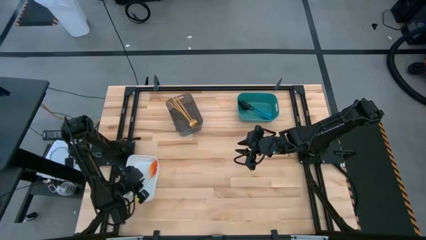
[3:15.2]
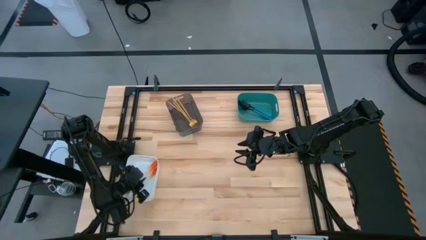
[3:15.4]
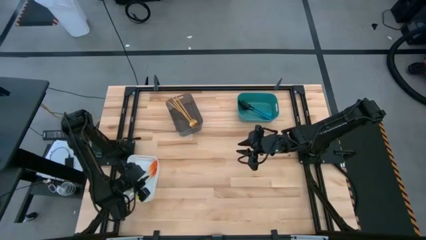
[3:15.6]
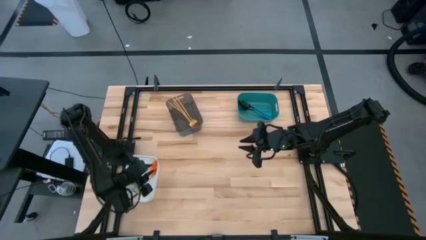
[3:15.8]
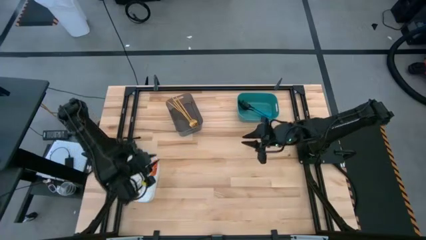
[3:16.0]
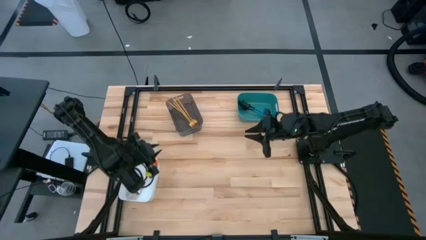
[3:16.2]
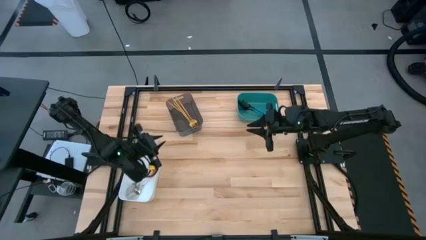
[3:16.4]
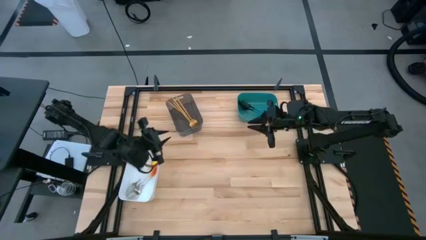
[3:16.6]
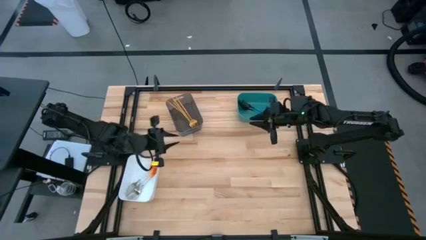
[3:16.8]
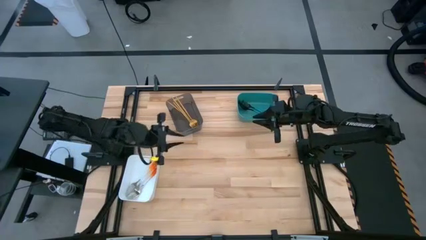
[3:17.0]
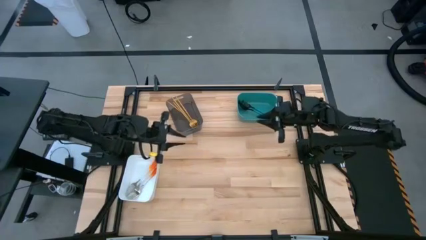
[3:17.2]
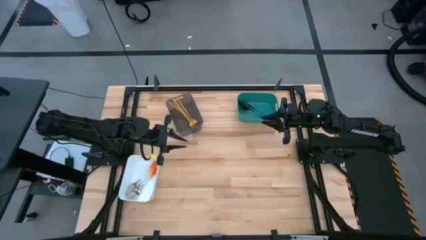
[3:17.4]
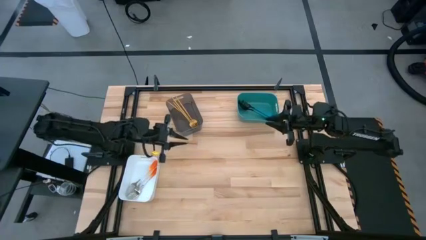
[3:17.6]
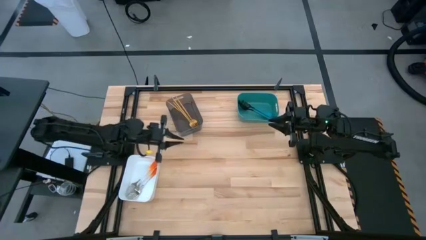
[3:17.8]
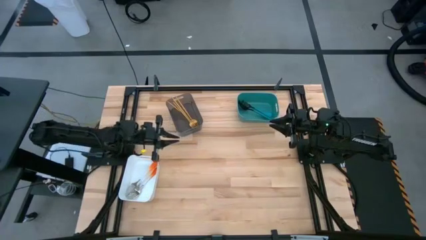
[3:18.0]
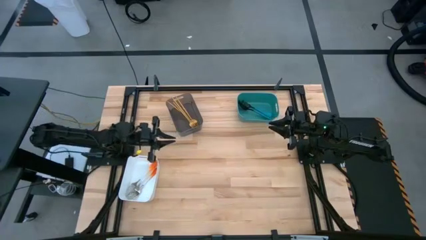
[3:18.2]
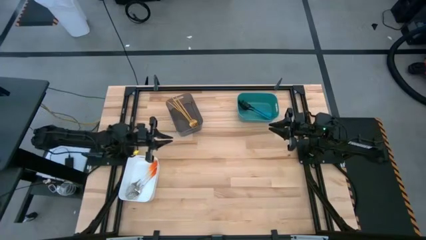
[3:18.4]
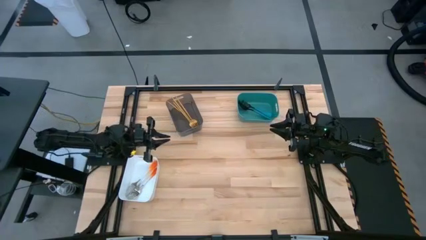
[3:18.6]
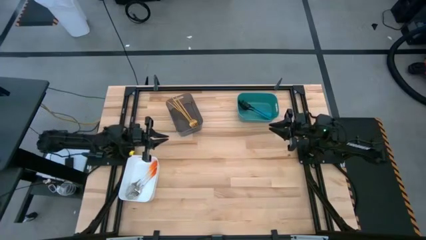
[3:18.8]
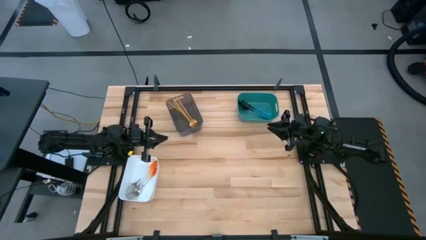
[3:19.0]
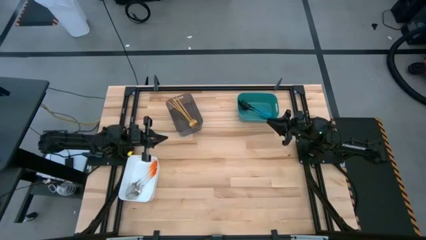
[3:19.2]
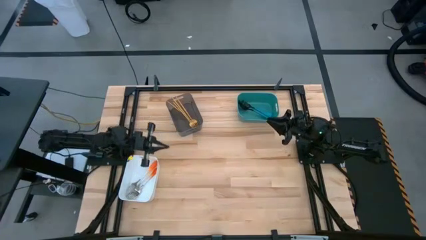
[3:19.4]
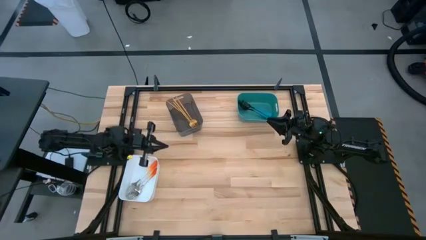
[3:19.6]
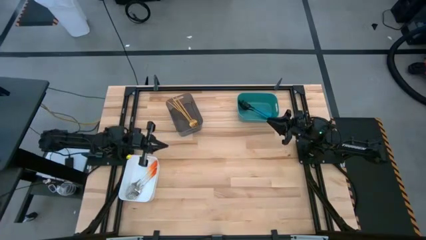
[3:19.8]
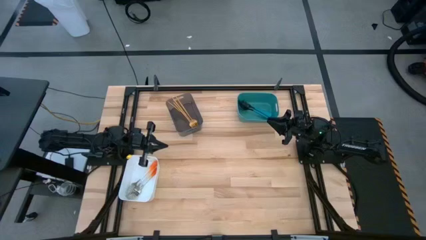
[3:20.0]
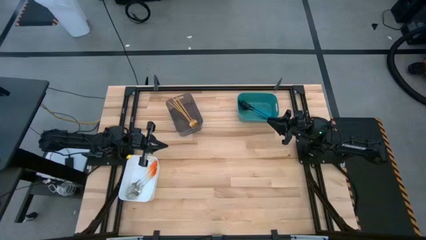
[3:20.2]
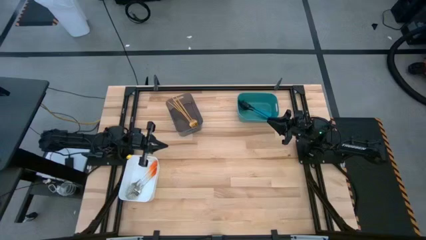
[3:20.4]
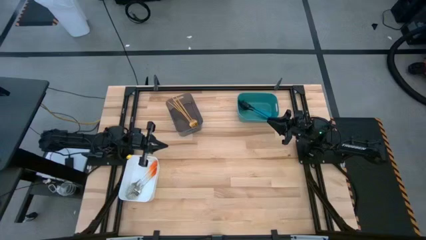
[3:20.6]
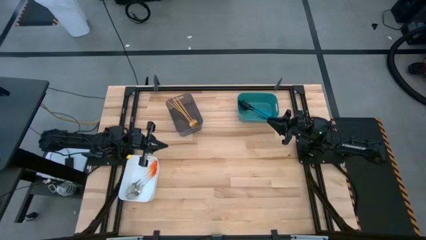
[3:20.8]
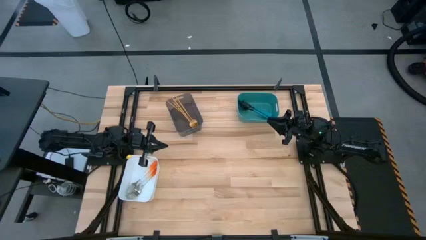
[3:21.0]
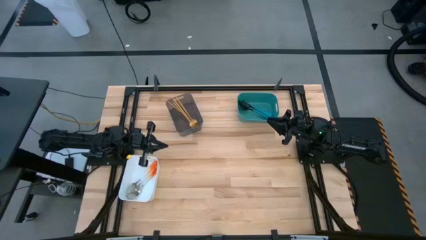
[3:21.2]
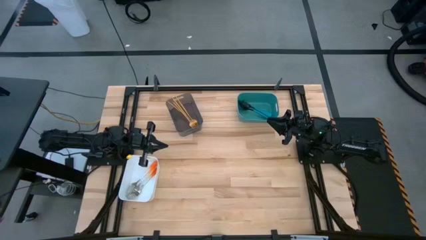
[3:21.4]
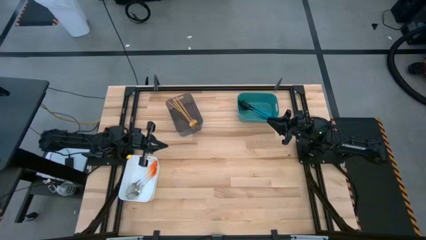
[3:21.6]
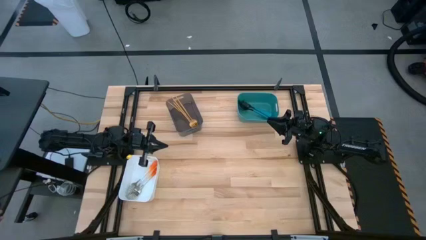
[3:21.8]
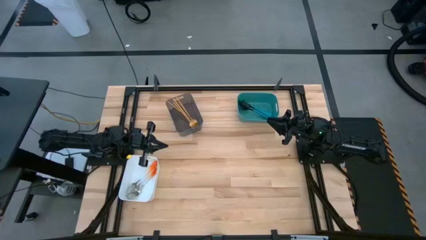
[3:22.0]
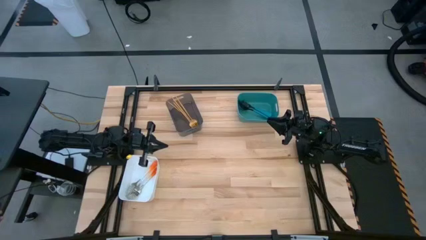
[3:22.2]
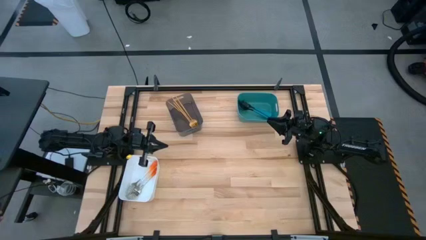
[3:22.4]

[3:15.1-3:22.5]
Task: Sort silverware by color (type)
Return to Home Position

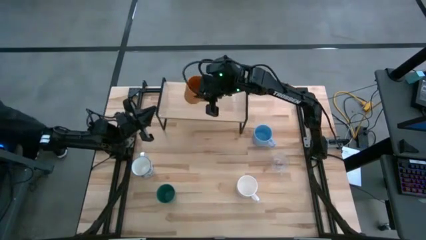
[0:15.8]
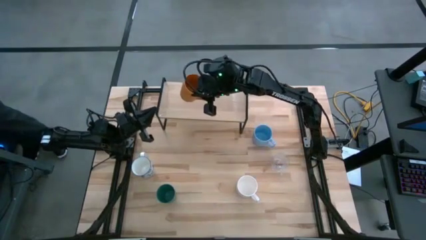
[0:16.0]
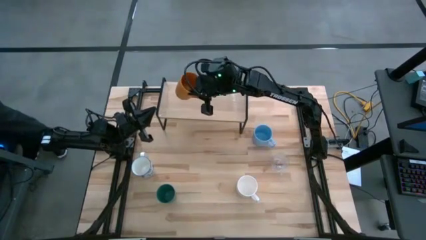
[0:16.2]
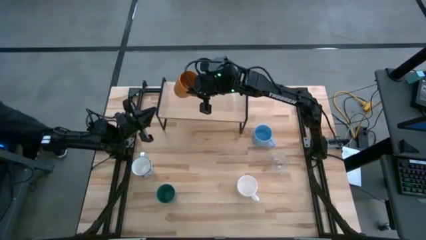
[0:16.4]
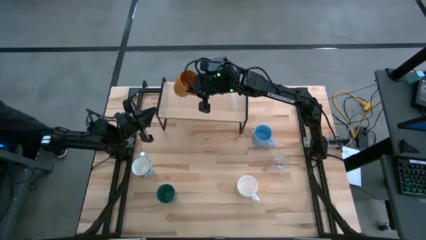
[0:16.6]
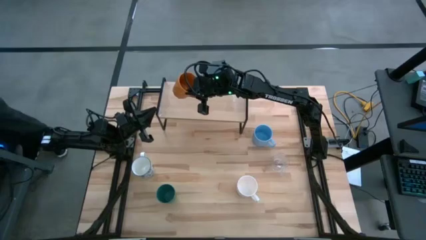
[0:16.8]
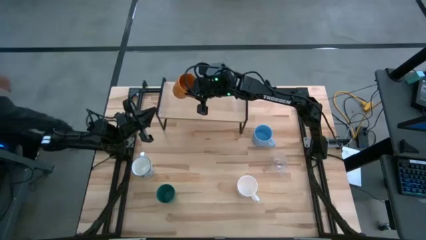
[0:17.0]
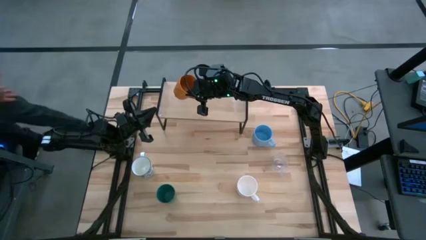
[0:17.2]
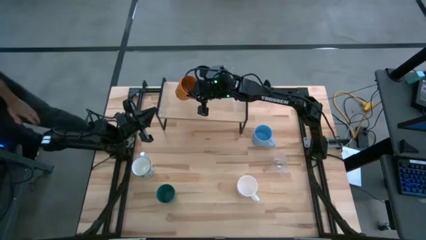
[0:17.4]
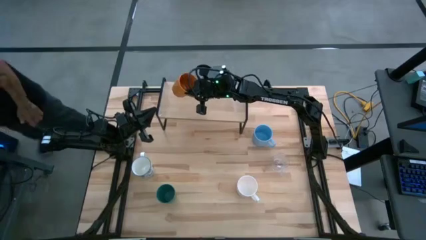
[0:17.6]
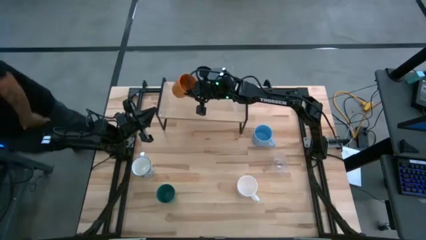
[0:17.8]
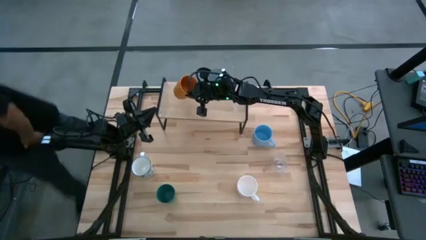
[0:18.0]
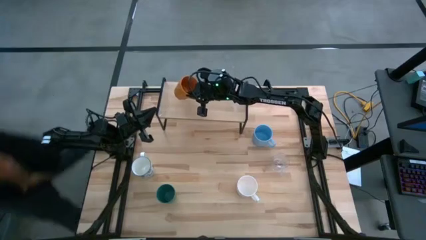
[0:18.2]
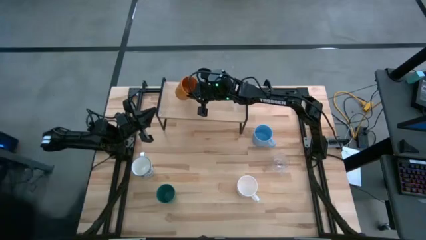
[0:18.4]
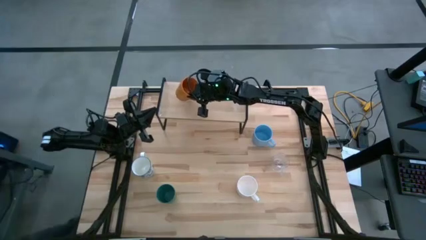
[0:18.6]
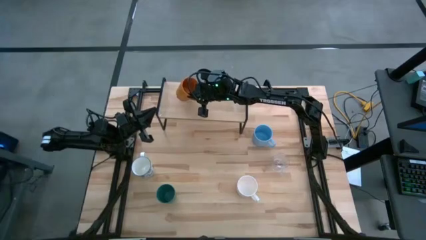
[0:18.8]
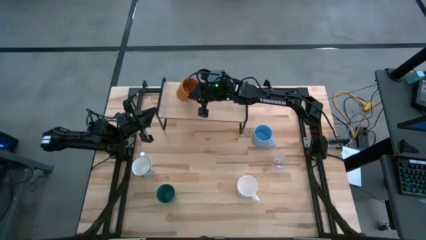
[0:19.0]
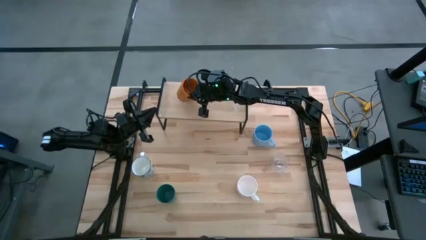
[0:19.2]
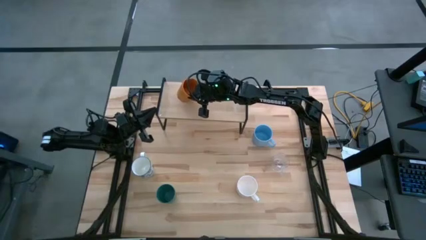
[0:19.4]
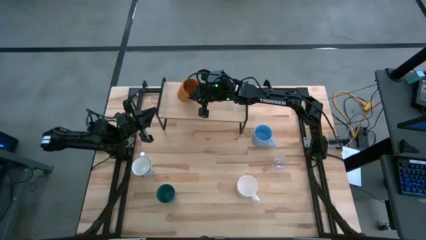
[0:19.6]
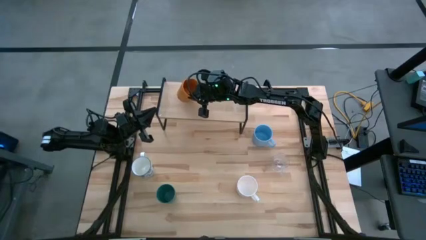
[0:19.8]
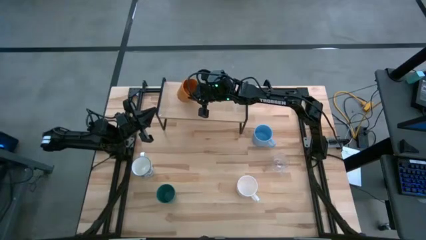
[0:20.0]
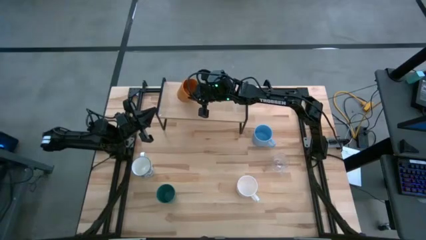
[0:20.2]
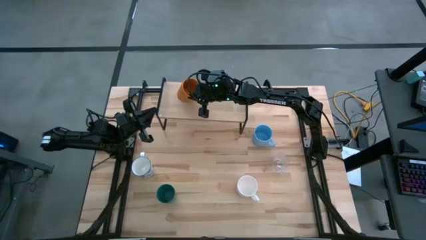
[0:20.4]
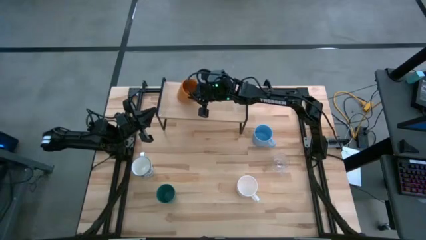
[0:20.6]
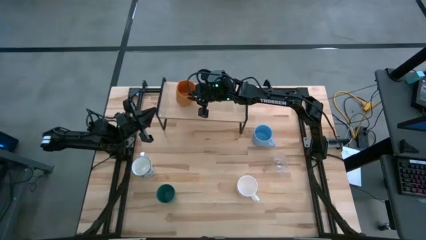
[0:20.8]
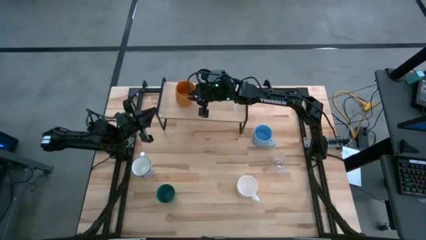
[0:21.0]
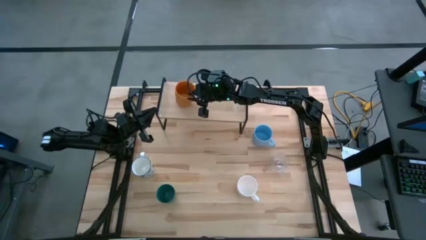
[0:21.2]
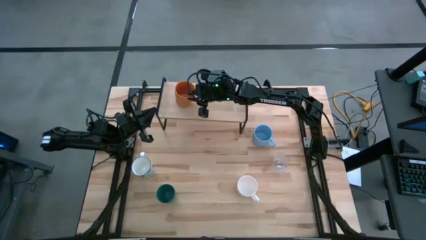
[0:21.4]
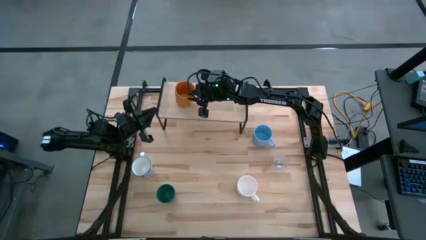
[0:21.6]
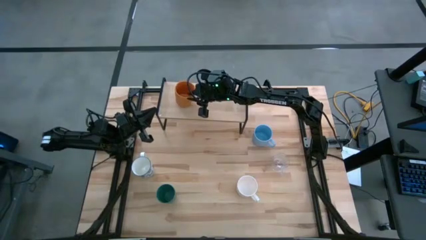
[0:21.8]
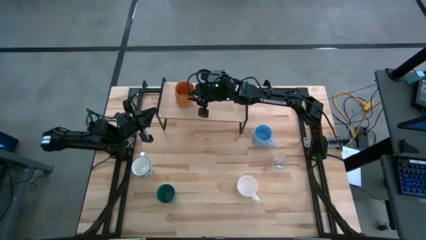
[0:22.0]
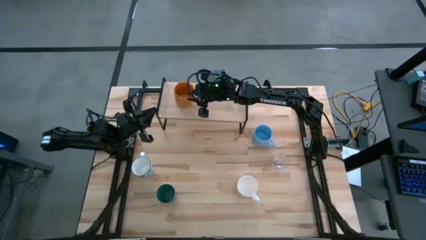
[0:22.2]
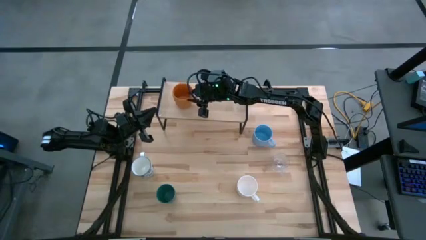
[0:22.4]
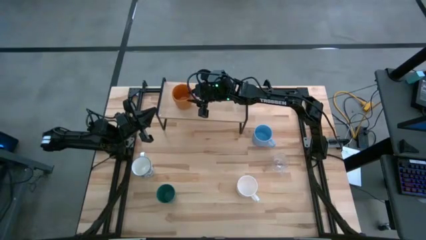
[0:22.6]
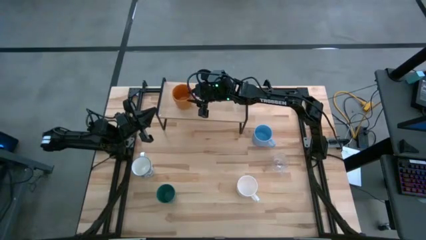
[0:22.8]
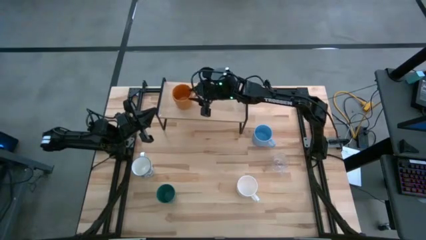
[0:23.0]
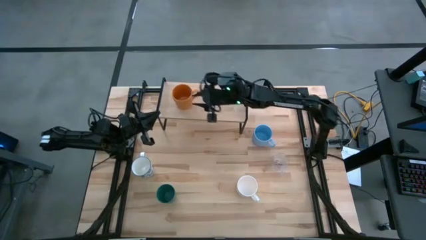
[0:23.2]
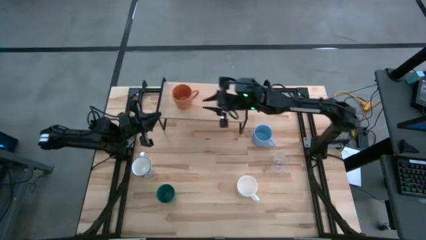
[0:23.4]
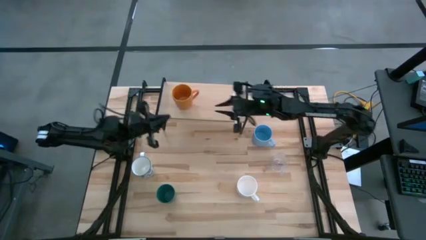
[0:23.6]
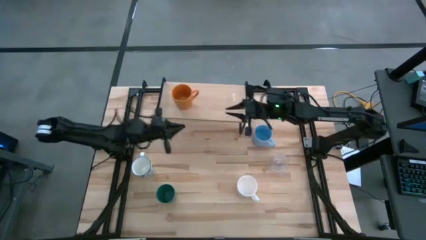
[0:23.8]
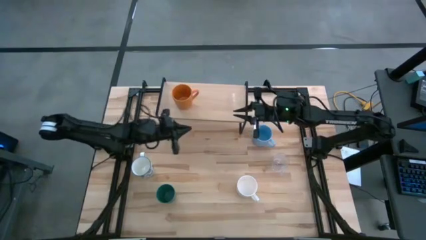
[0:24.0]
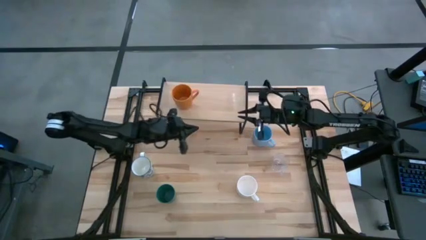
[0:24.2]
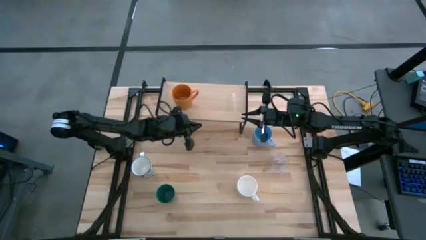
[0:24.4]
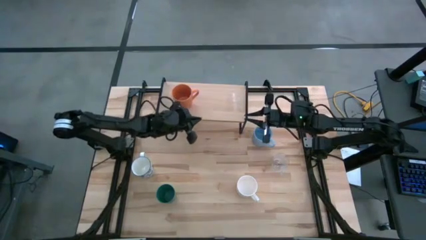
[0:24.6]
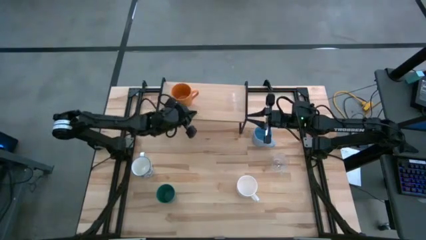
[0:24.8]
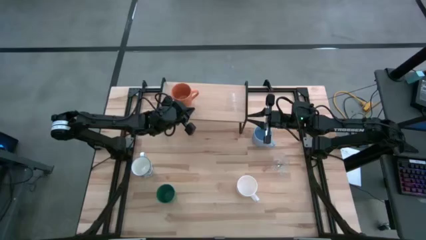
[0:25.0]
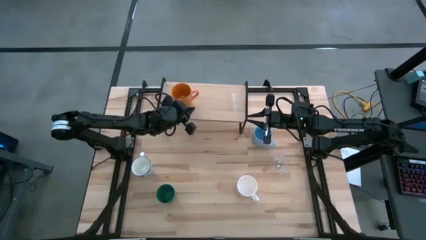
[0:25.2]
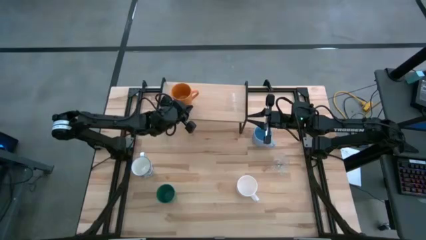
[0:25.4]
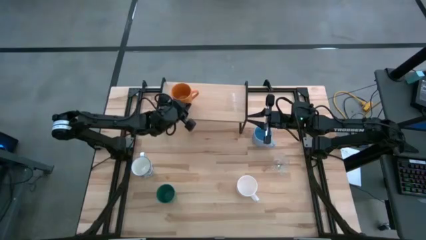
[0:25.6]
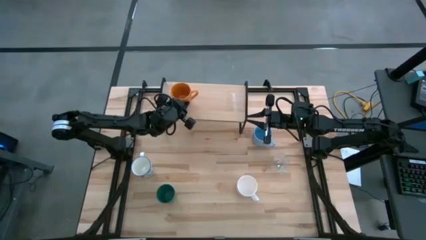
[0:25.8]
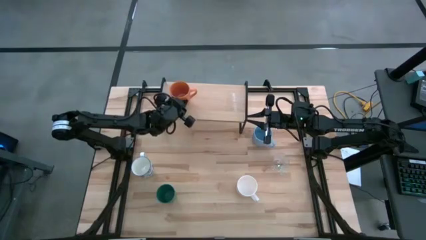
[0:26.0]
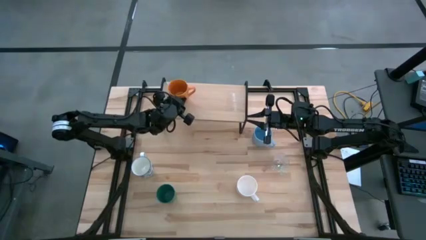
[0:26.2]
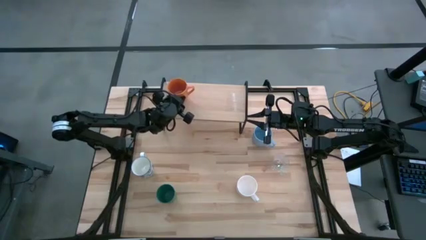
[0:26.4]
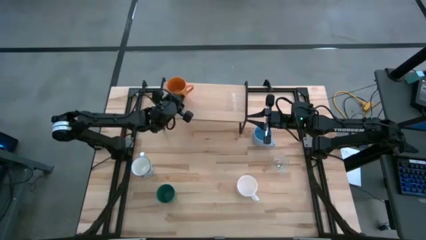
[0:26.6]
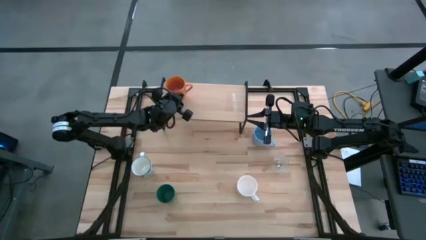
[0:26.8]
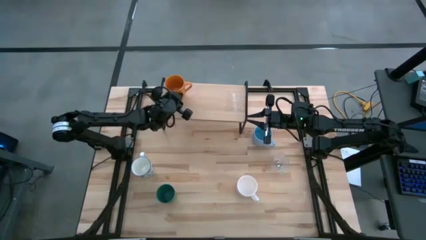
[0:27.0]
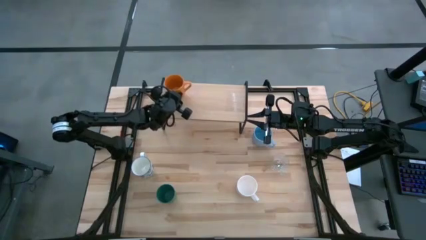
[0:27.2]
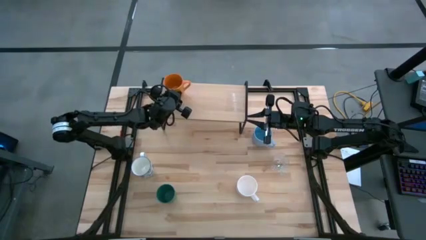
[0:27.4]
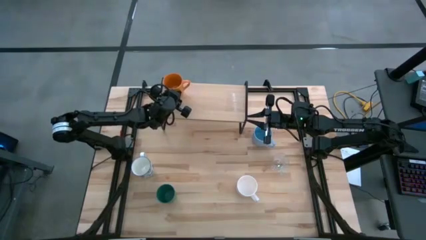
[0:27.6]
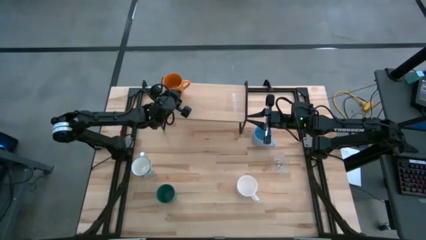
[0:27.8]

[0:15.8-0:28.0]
Task: Stack small to large cups/mugs on shelf
Put the orange mug on the shelf
